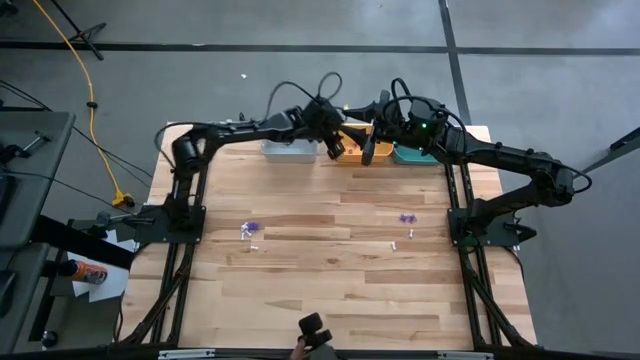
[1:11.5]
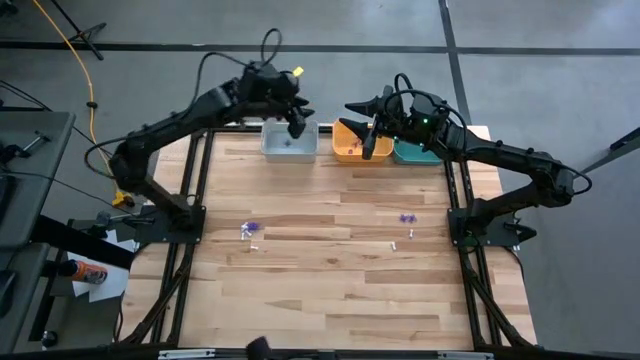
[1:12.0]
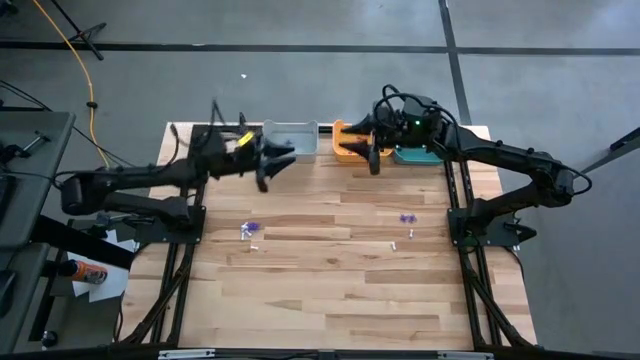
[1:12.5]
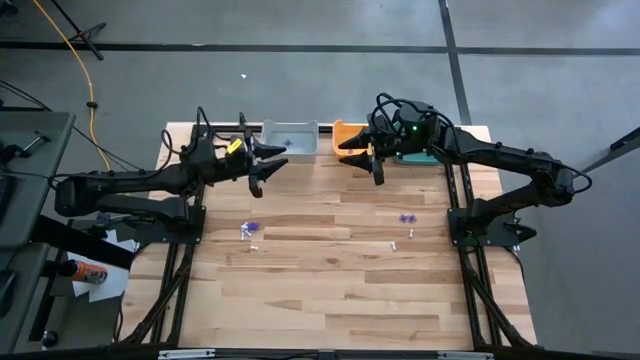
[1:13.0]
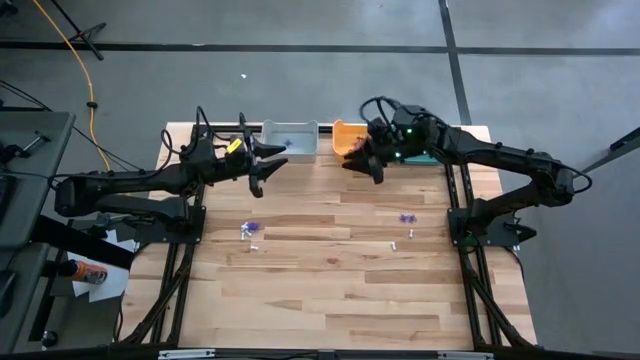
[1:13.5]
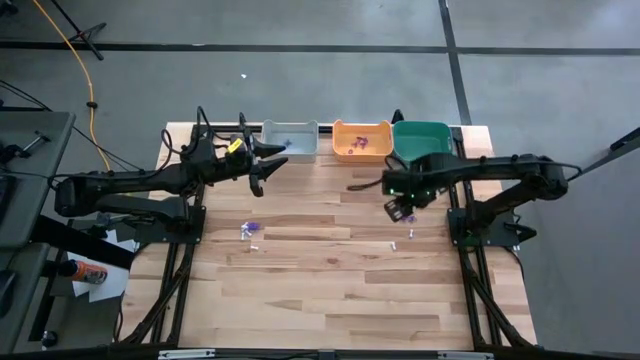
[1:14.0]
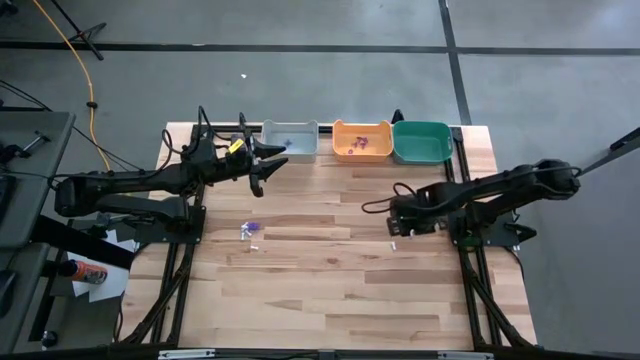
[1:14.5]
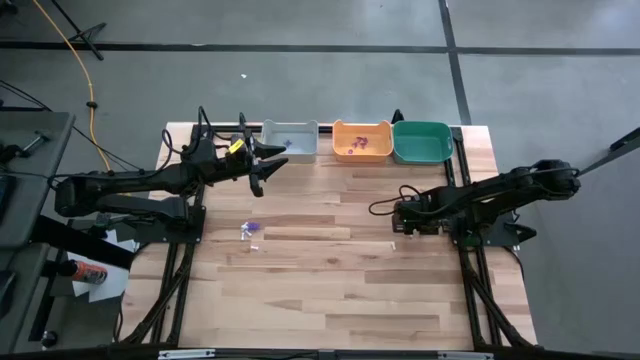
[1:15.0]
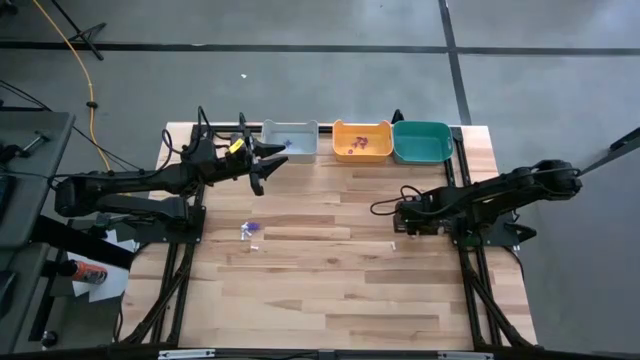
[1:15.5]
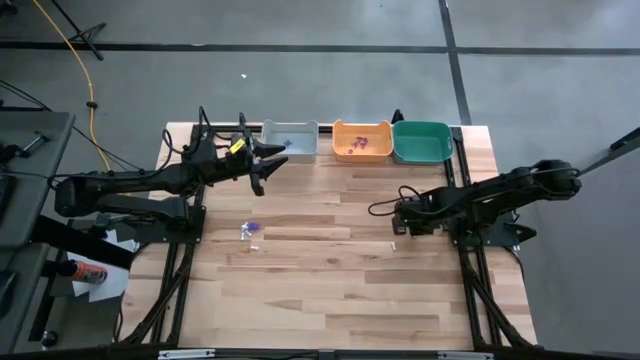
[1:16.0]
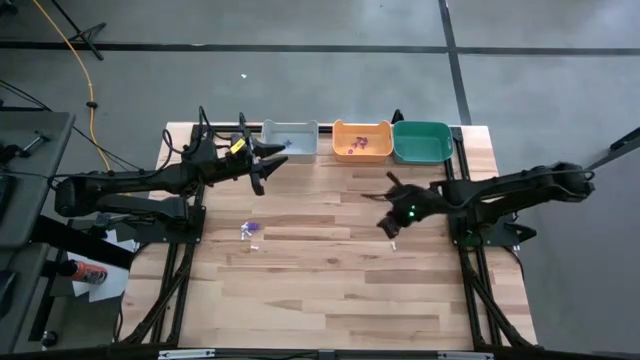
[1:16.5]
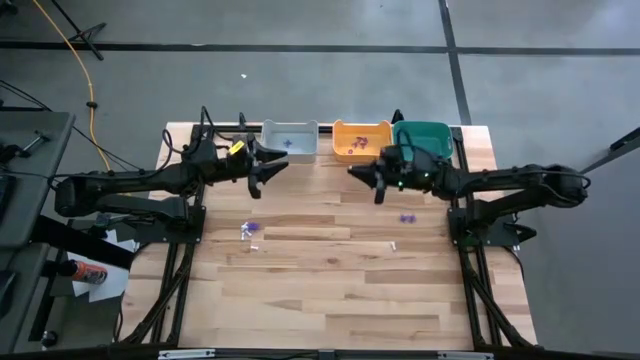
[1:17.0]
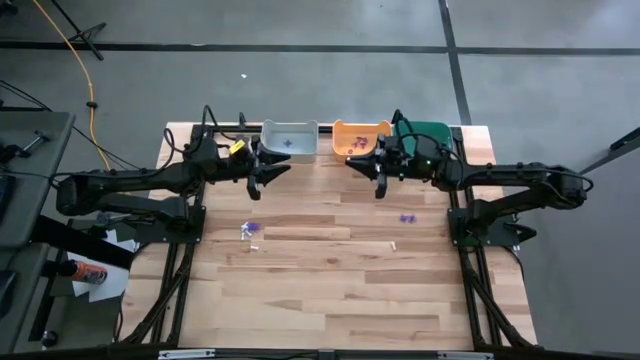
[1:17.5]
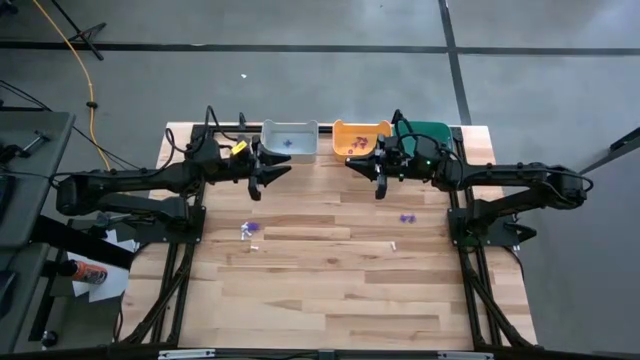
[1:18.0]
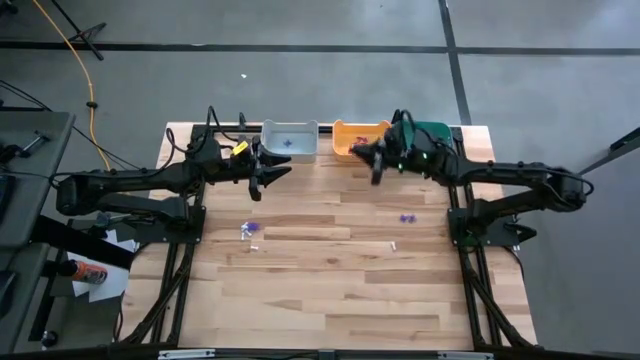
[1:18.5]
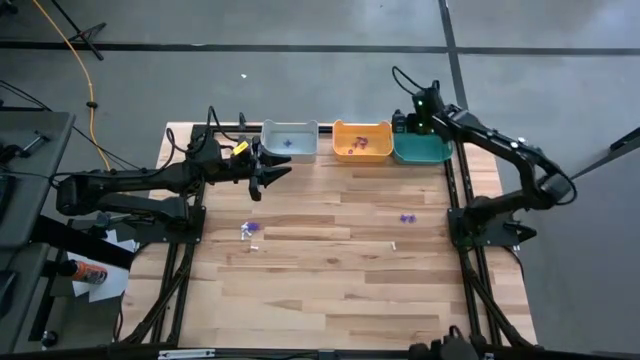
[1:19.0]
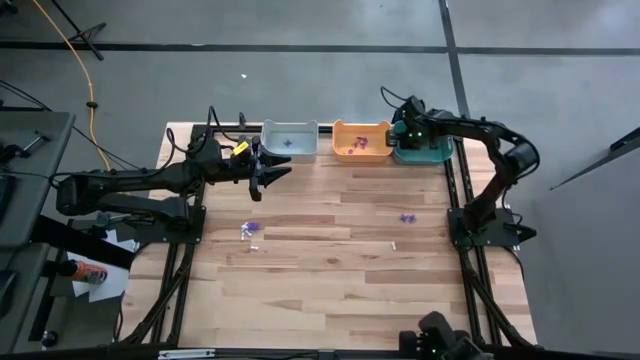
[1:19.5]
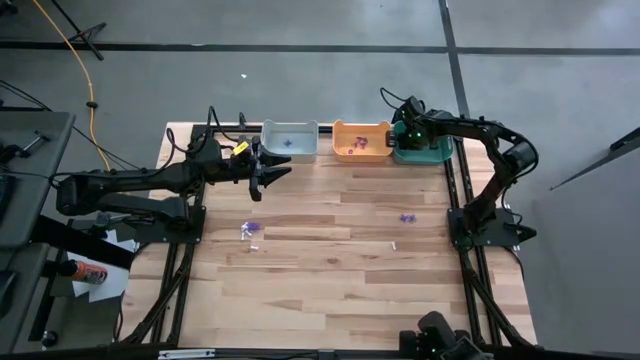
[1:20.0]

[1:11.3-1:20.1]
Task: Sort Halloween decoration
Put the white bone toy into the green bin

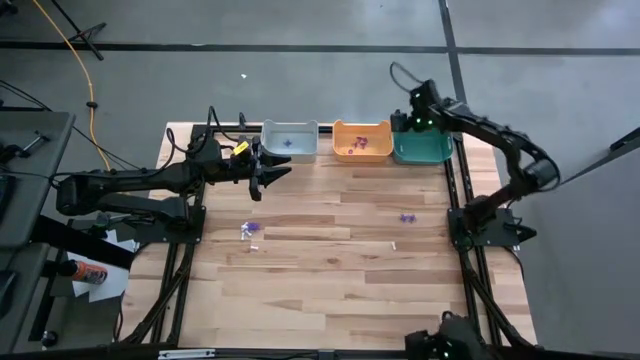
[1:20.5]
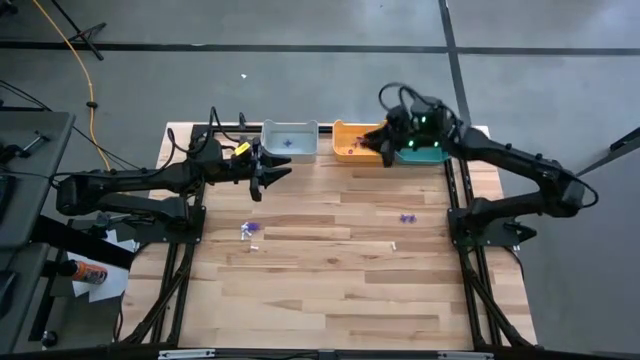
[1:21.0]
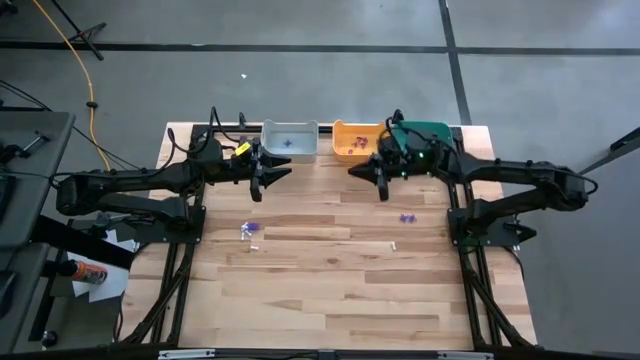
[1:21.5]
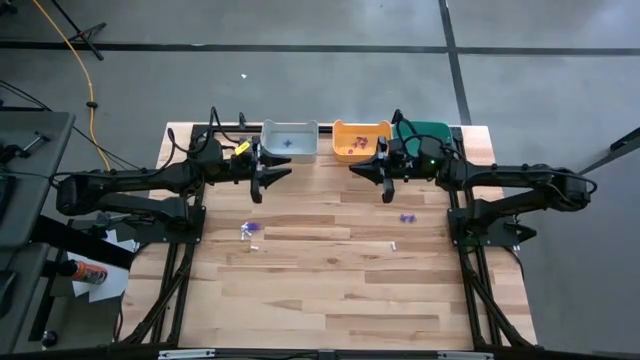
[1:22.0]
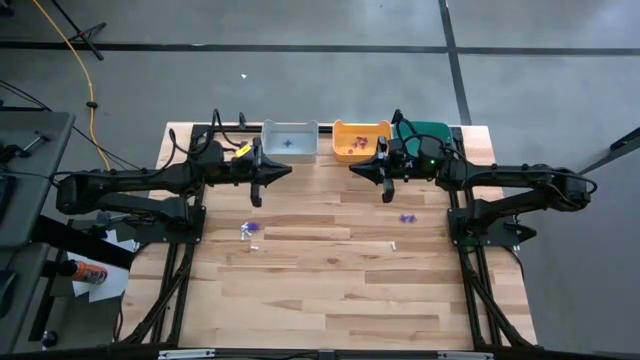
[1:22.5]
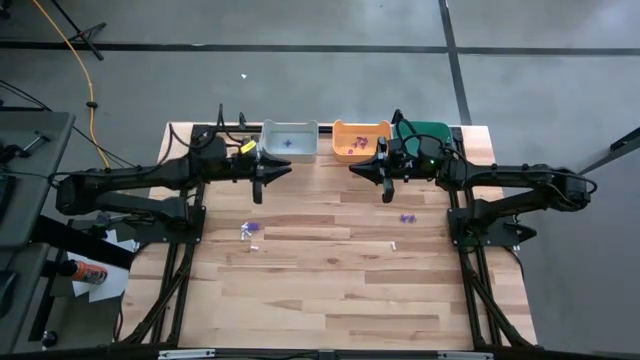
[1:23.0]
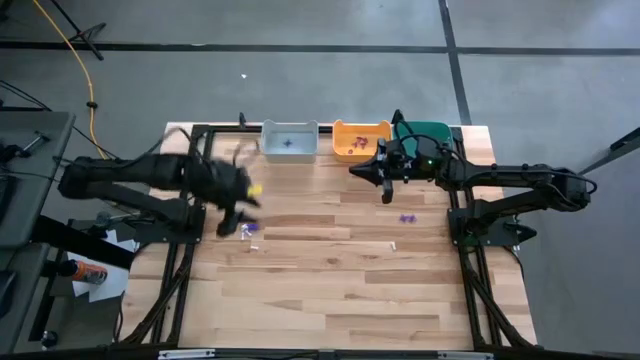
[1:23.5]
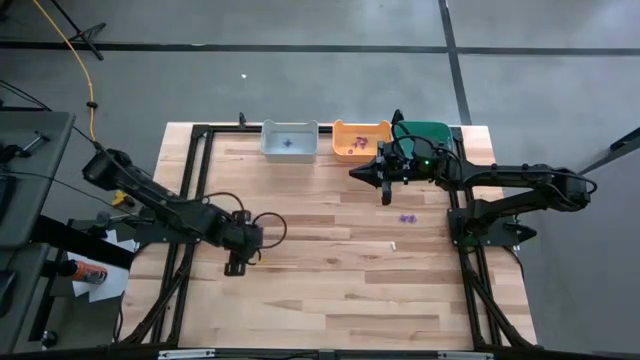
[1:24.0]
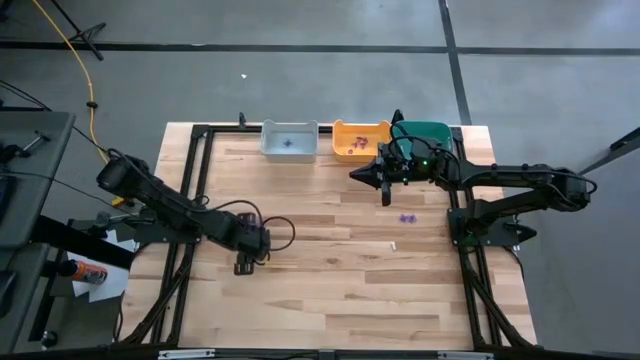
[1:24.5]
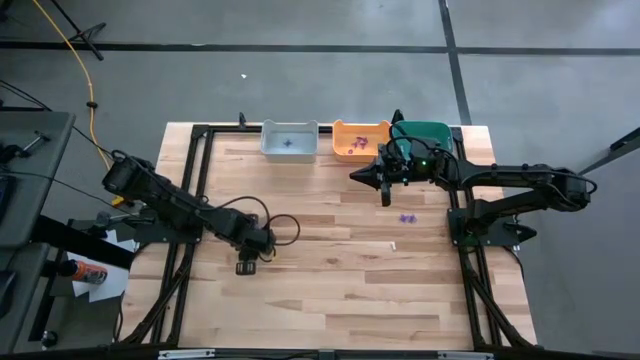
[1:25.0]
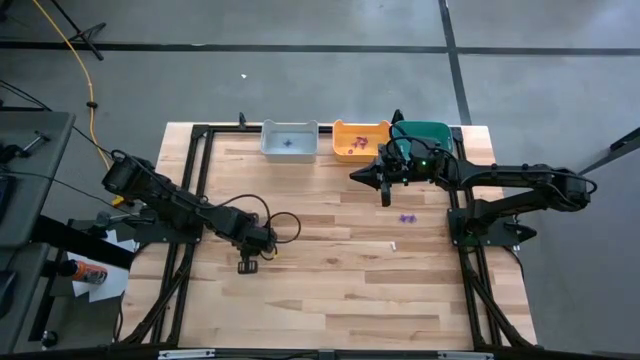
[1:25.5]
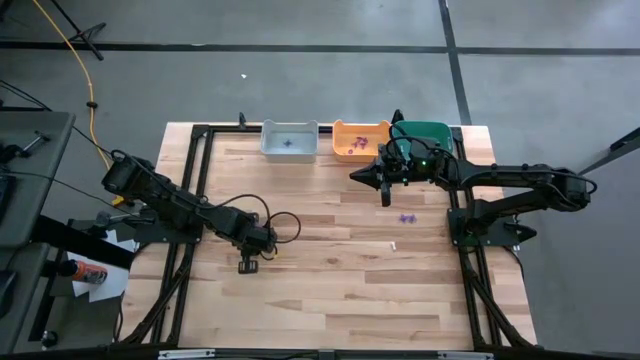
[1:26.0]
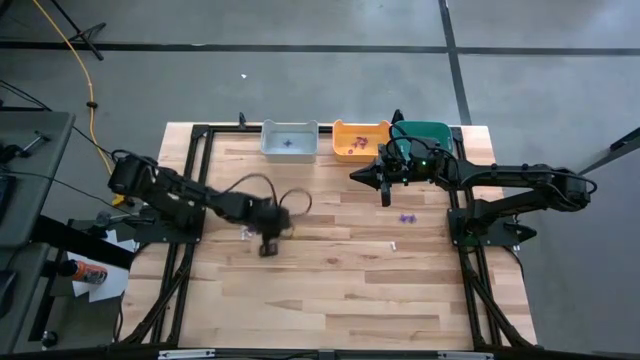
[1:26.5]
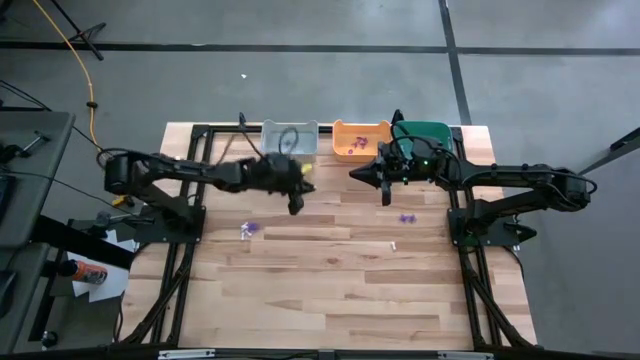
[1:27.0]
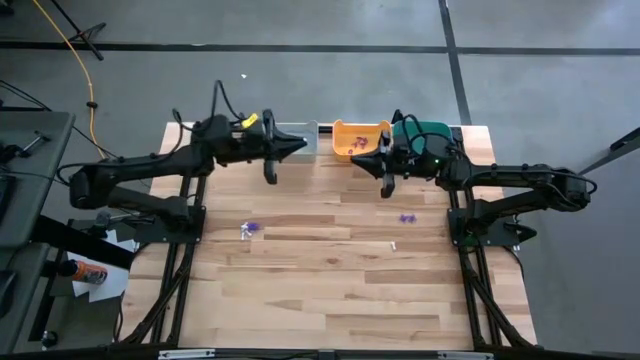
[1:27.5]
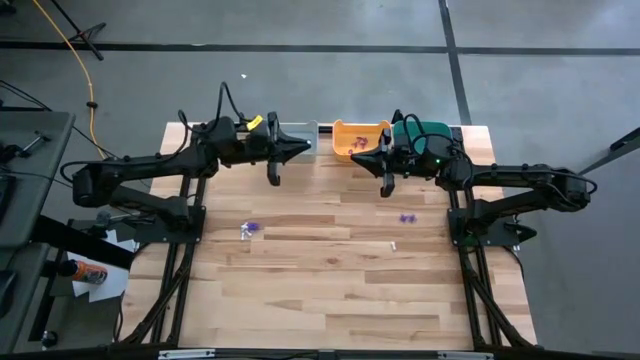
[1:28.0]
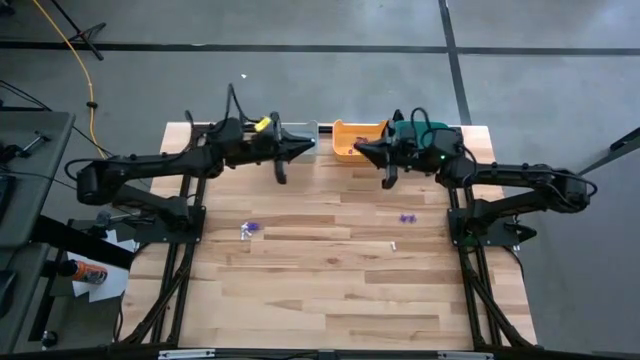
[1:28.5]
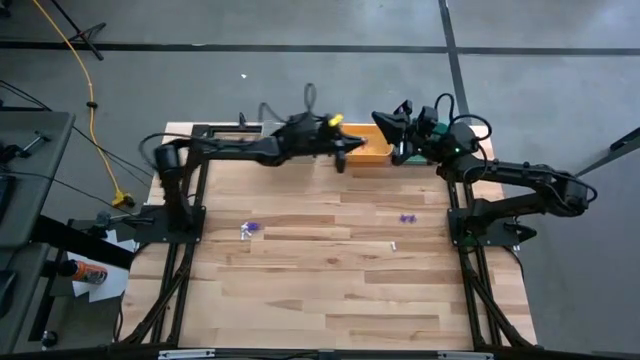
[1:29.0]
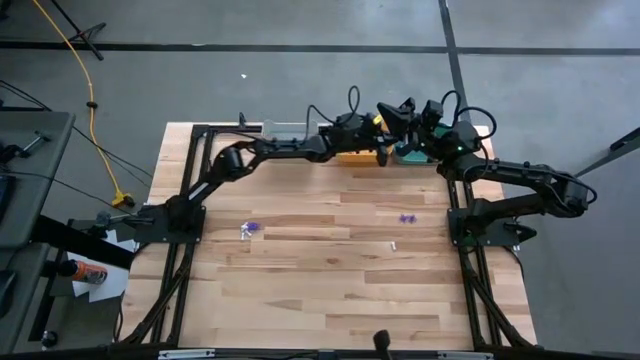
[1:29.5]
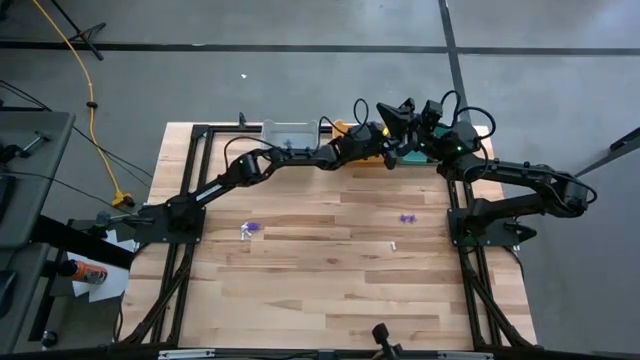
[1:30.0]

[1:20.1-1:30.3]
Put the white bone toy into the green bin
